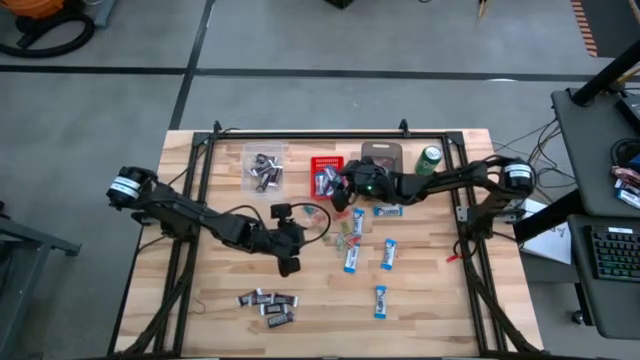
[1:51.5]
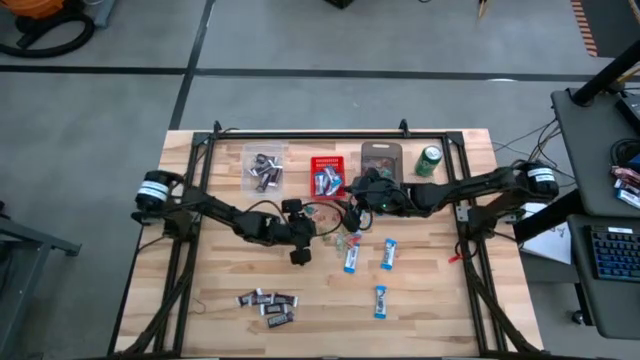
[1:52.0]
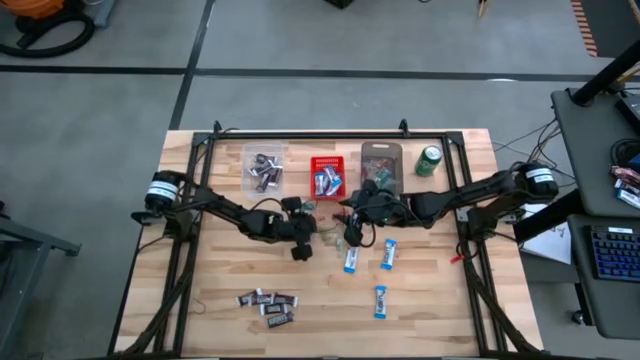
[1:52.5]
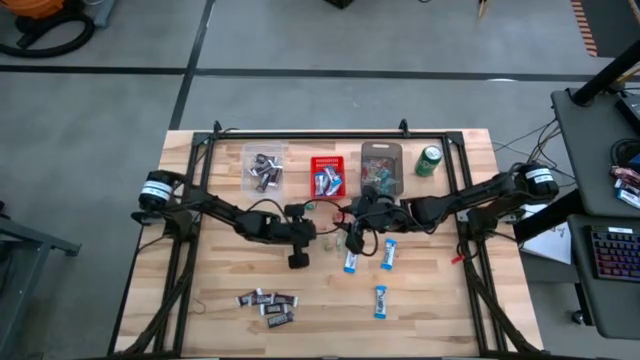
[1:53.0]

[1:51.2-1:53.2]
Task: Sort candy
Put the orange gummy candy into the black bin

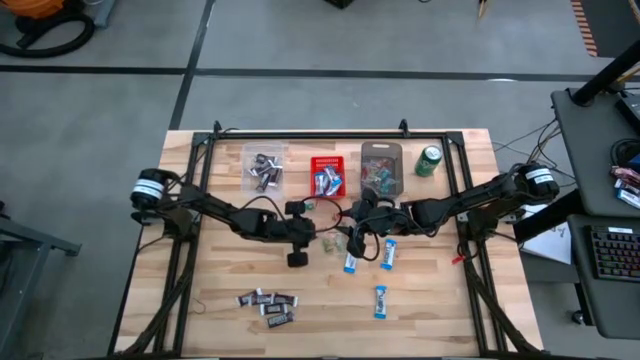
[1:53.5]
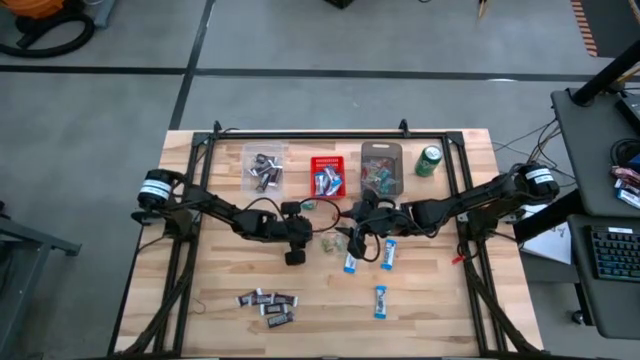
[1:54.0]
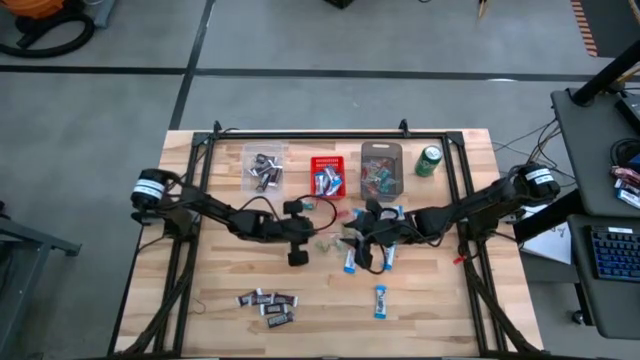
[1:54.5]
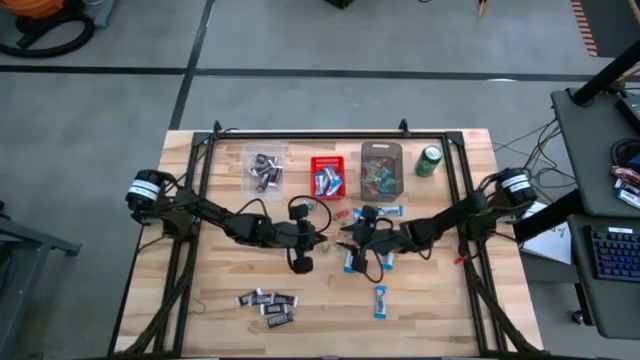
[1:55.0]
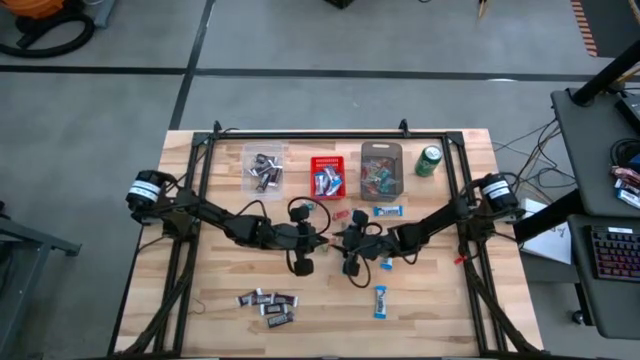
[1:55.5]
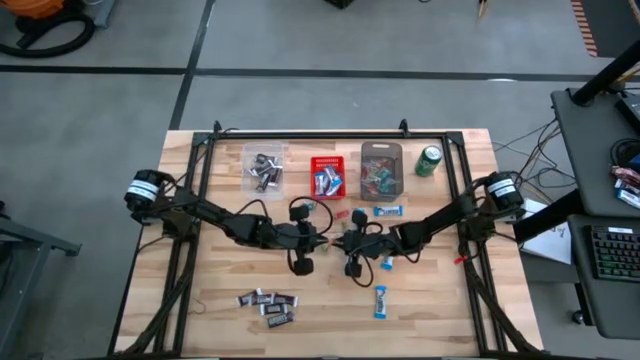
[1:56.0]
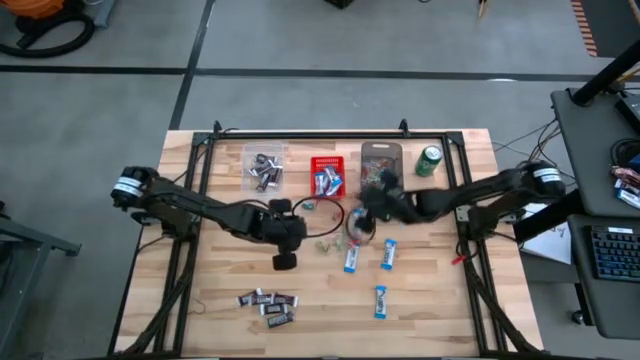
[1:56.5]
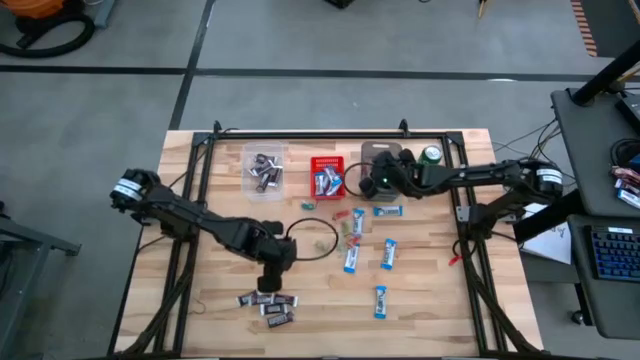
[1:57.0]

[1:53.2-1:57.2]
Put the orange gummy candy into the black bin

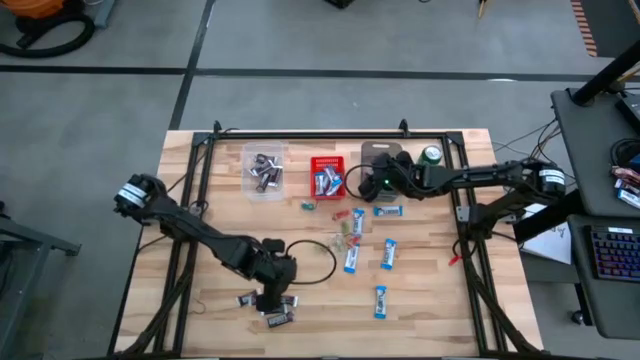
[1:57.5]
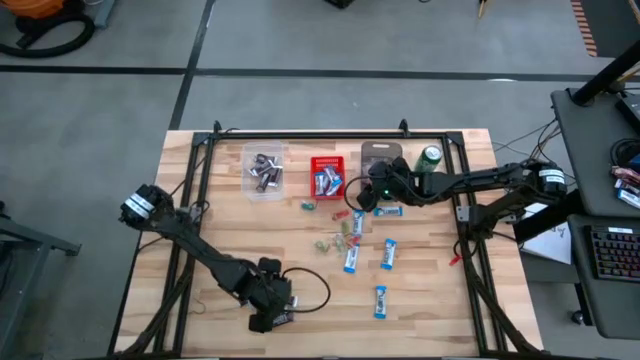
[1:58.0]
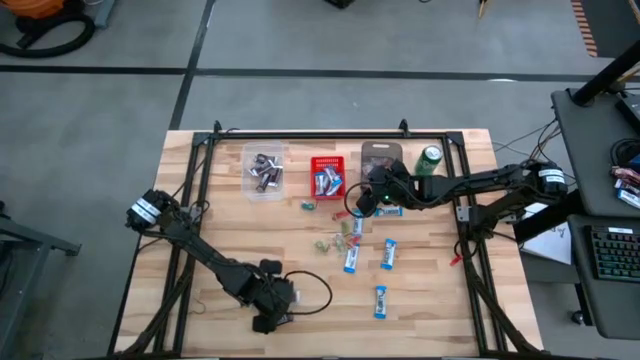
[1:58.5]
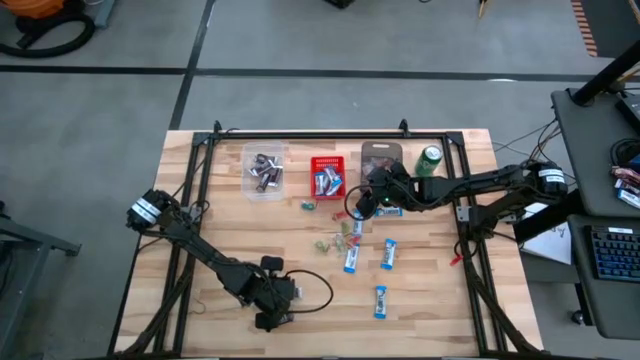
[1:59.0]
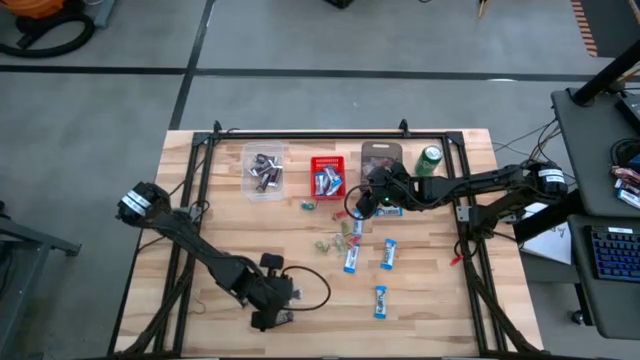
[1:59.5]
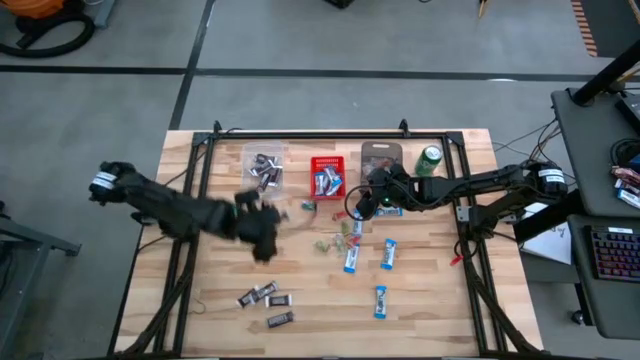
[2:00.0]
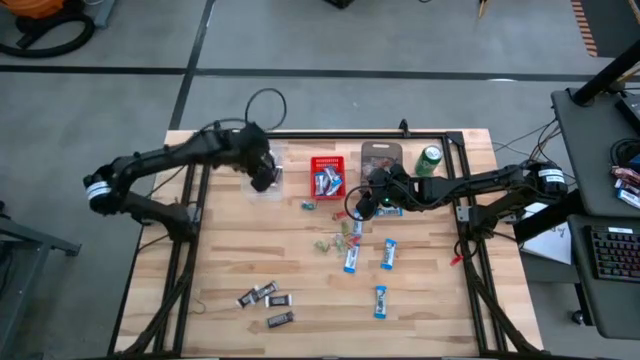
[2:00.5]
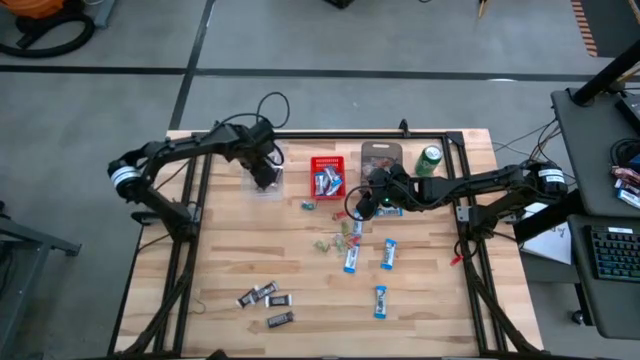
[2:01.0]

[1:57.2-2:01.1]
Put the brown chocolate bar into the transparent bin

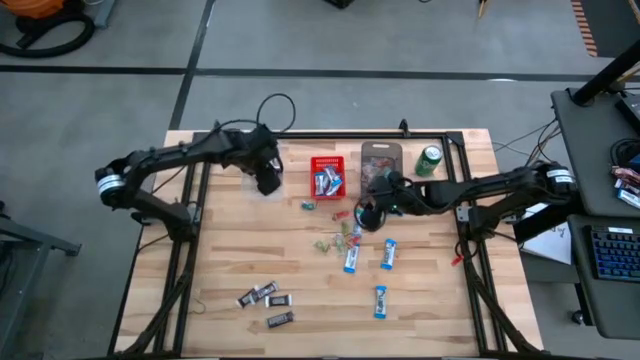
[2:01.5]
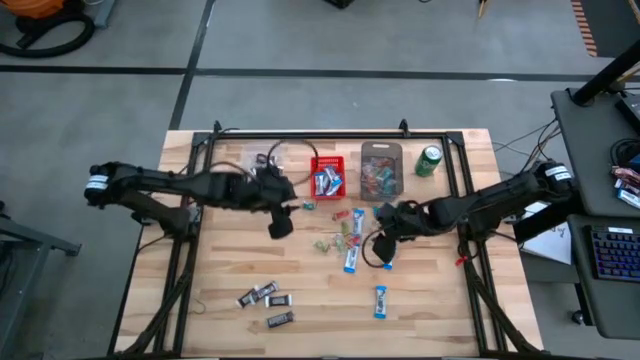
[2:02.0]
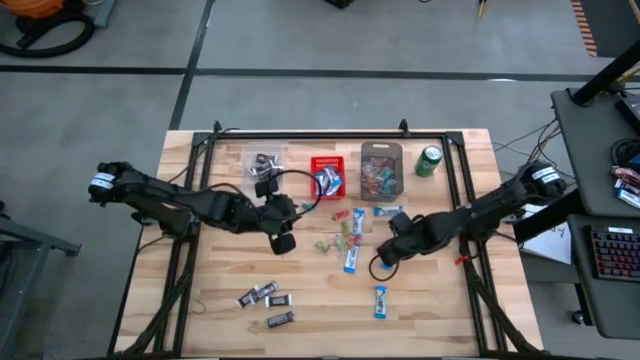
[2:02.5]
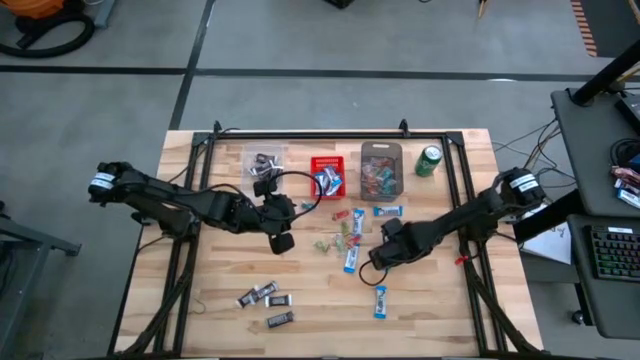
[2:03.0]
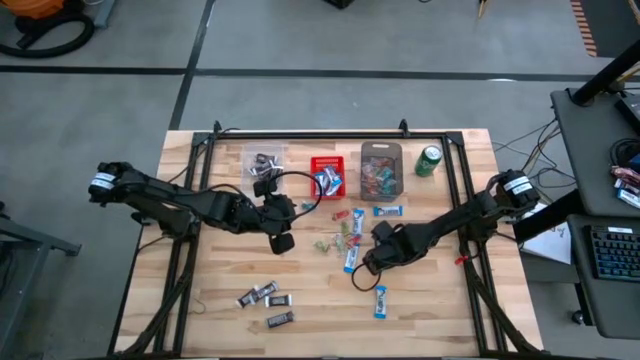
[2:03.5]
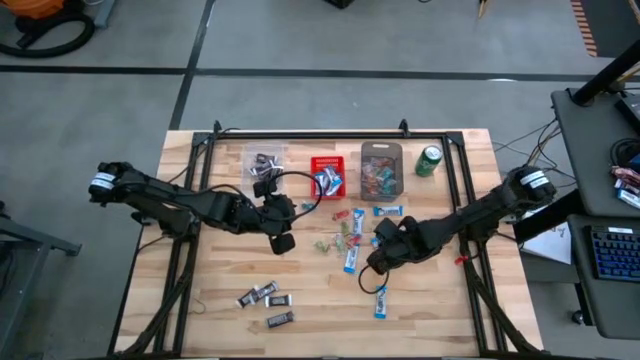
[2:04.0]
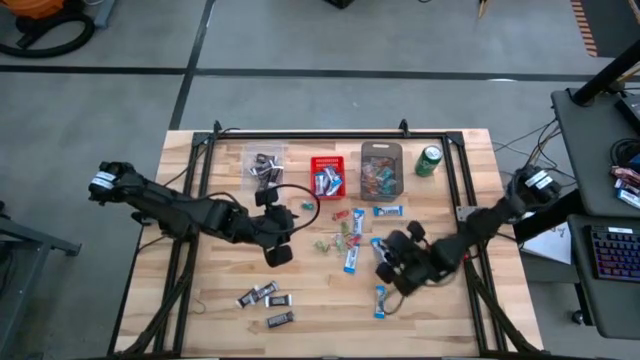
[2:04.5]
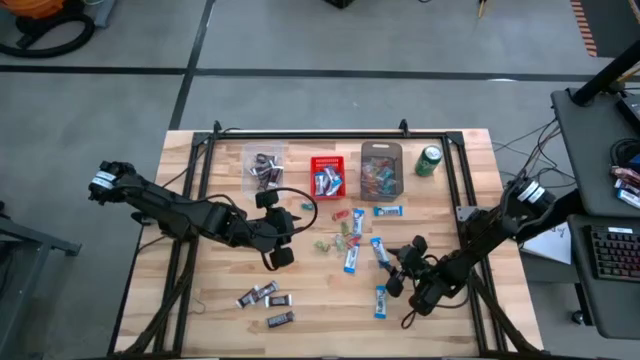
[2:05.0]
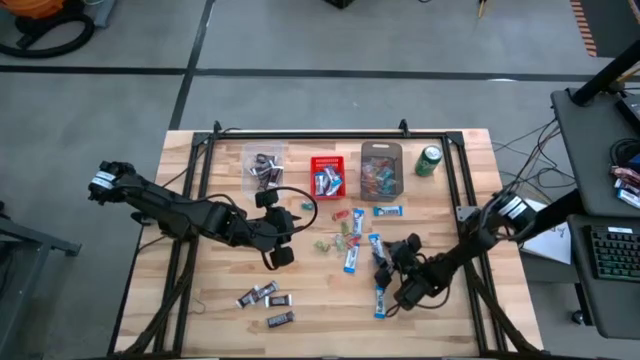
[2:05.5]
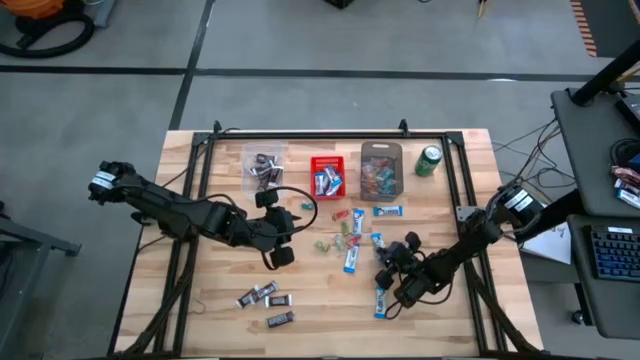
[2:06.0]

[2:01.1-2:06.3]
Put the white chocolate bar into the red bin

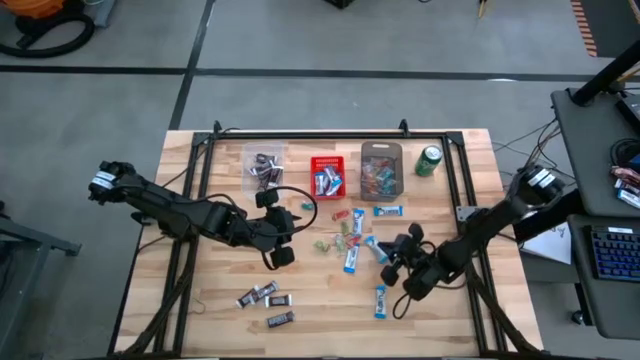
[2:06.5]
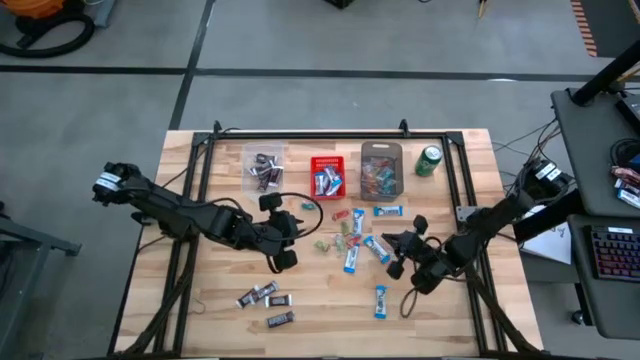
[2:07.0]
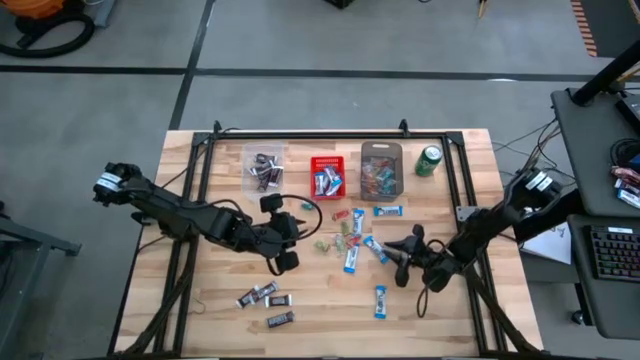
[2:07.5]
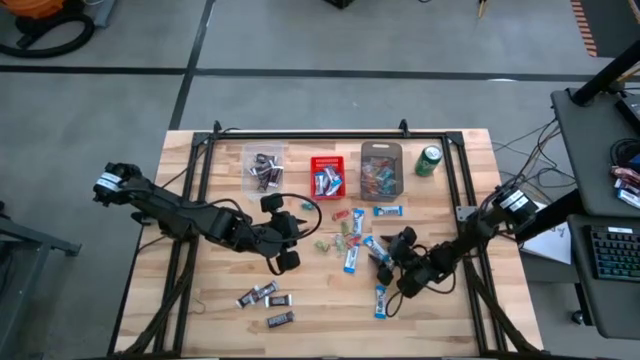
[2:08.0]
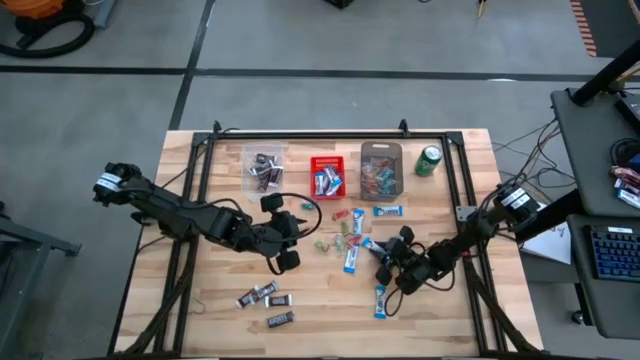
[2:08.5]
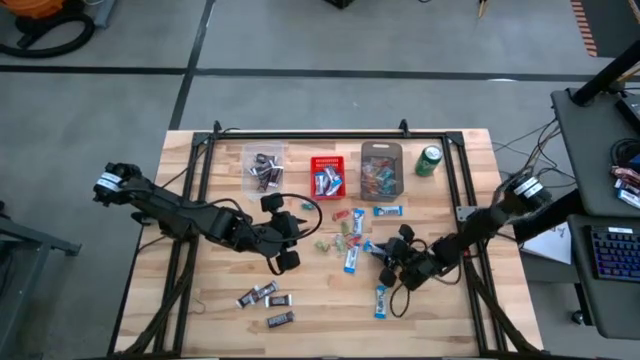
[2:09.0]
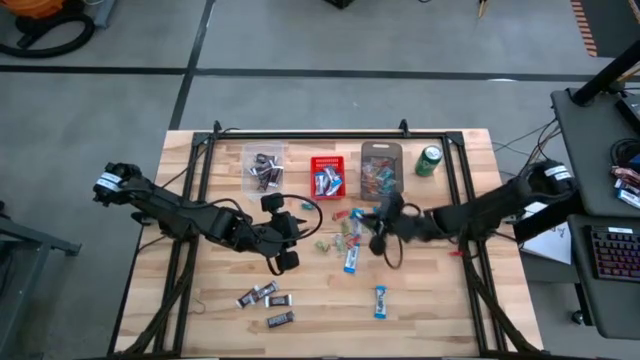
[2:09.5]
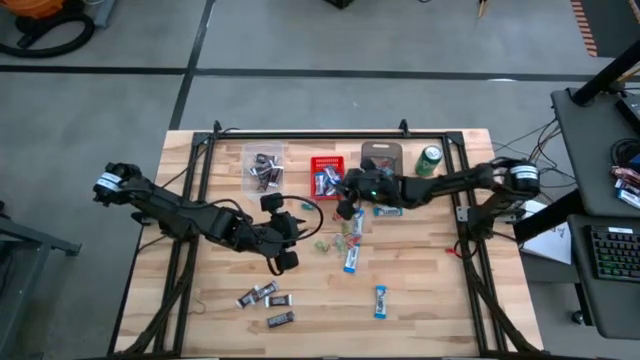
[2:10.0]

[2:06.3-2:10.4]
Put the white chocolate bar into the red bin

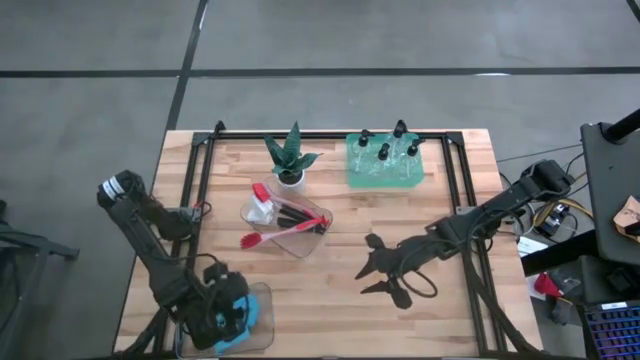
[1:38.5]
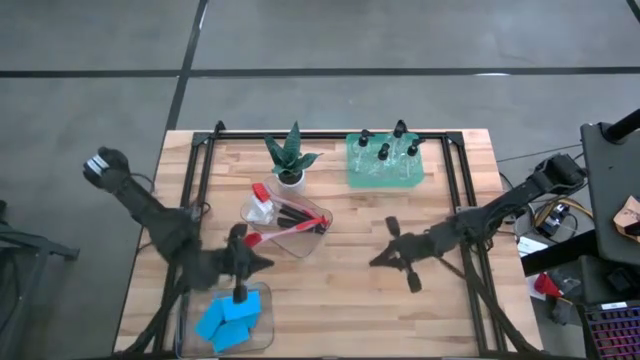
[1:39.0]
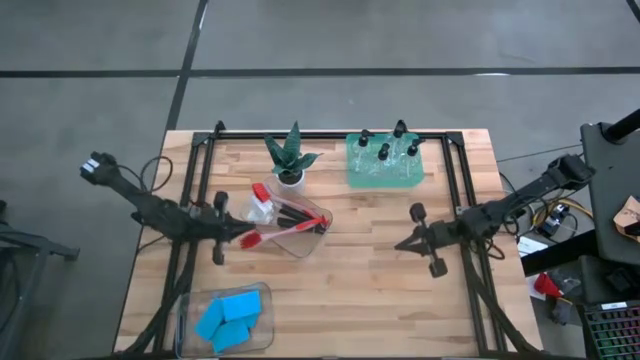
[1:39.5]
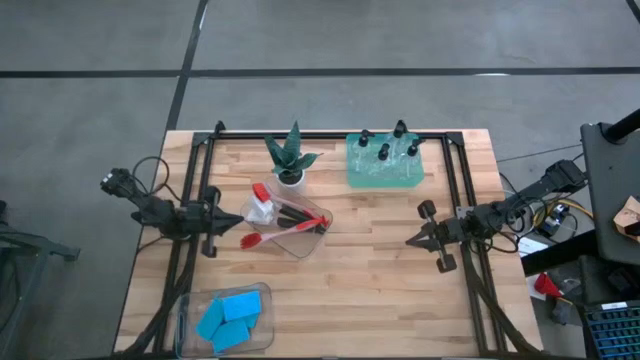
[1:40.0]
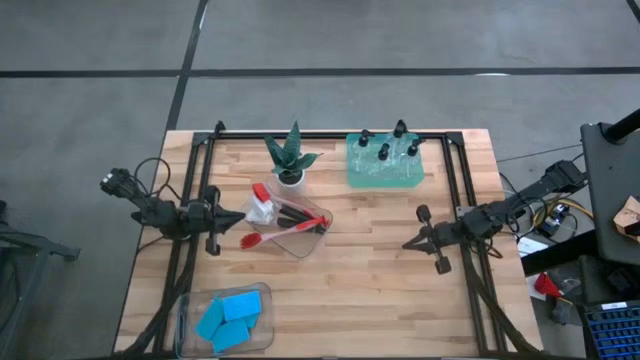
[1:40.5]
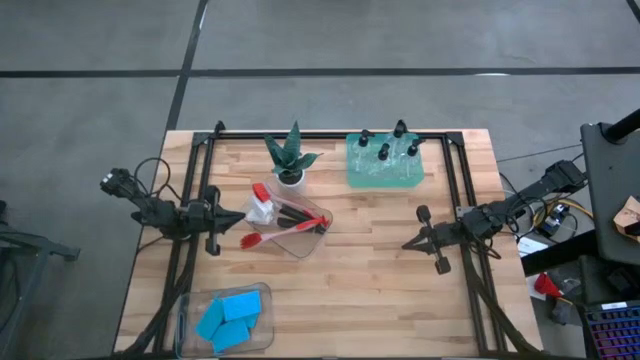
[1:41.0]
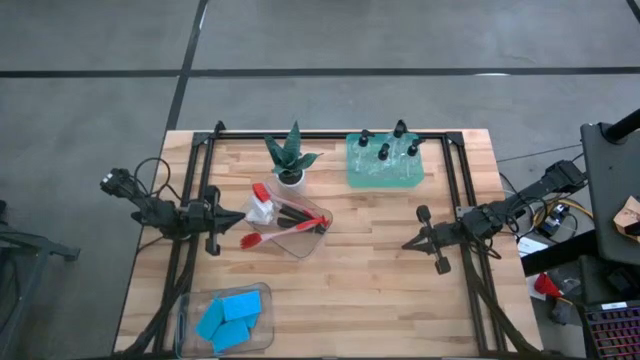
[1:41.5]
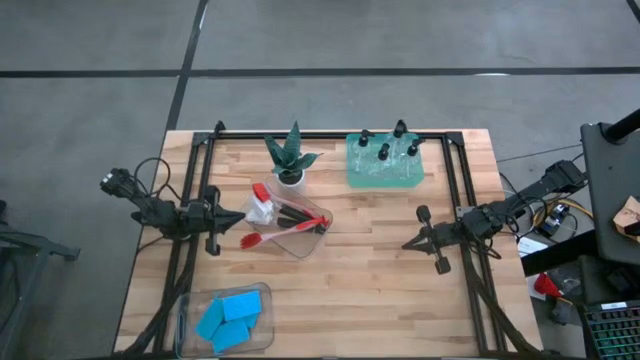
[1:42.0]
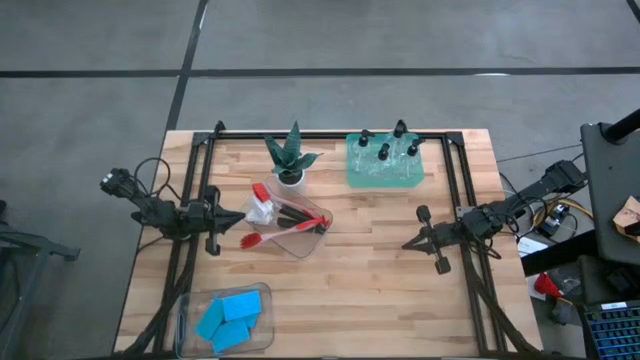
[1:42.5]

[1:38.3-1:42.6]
Task: Pick & Place Kitchen Sink Supplies
Return to Home Position
